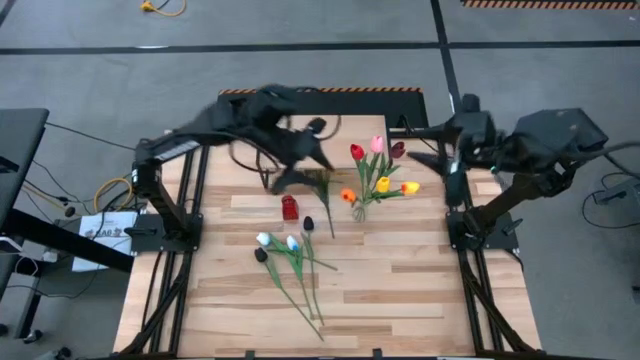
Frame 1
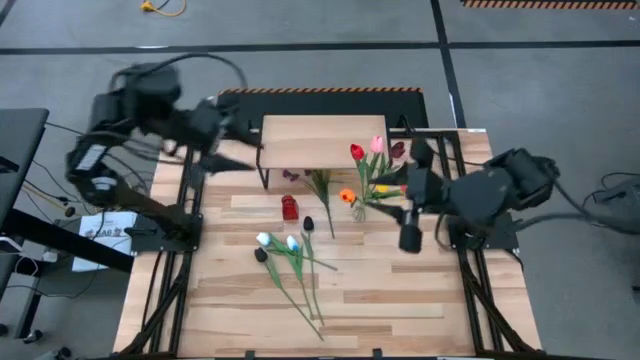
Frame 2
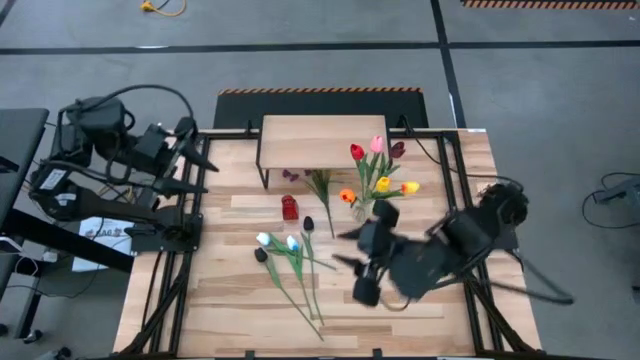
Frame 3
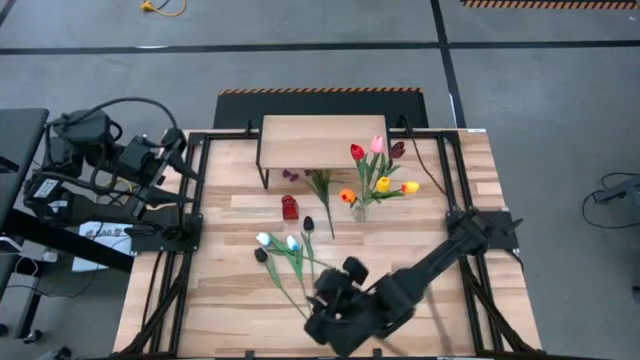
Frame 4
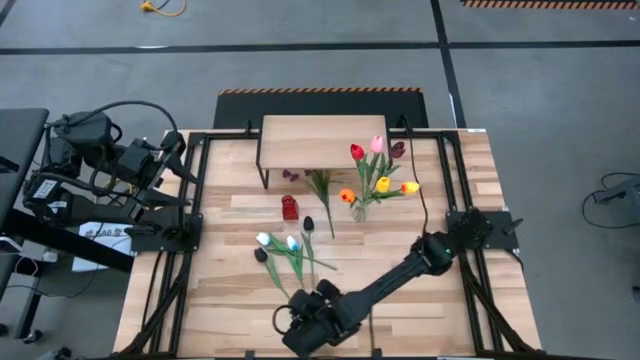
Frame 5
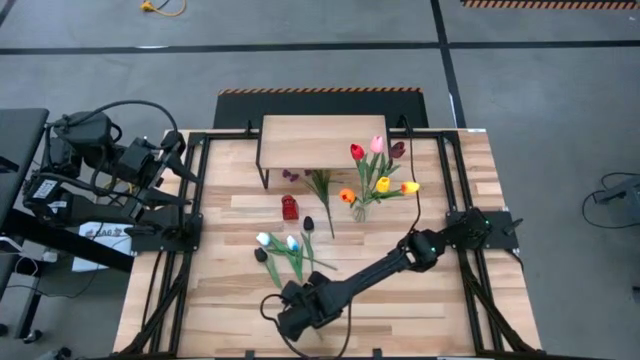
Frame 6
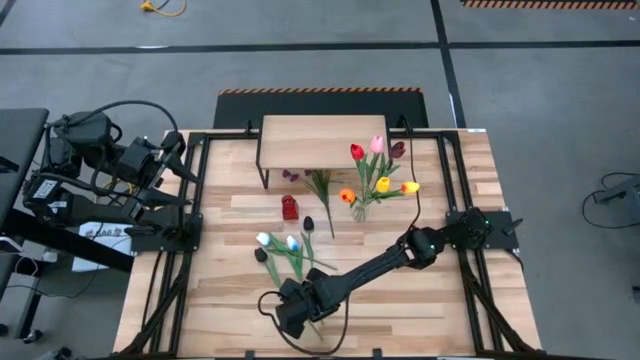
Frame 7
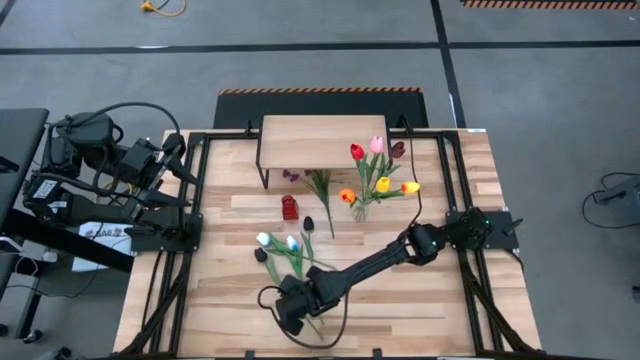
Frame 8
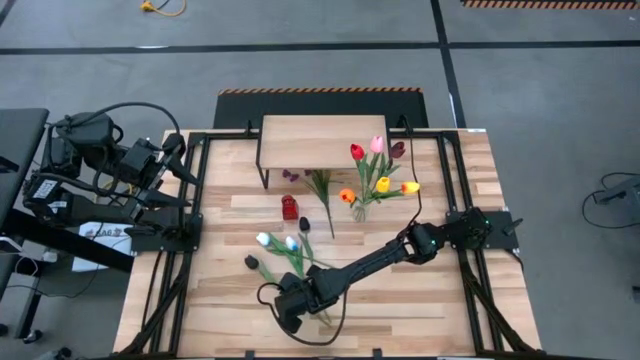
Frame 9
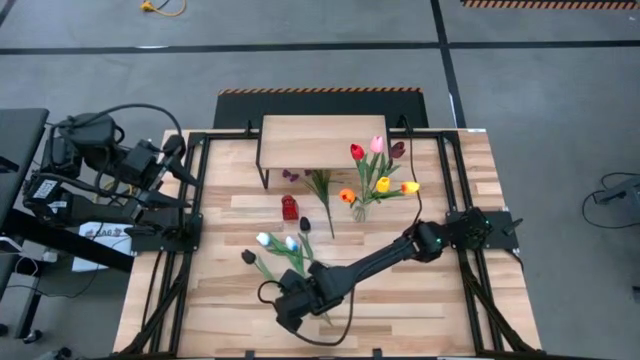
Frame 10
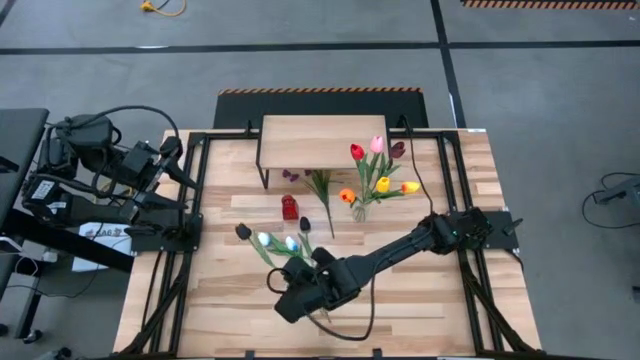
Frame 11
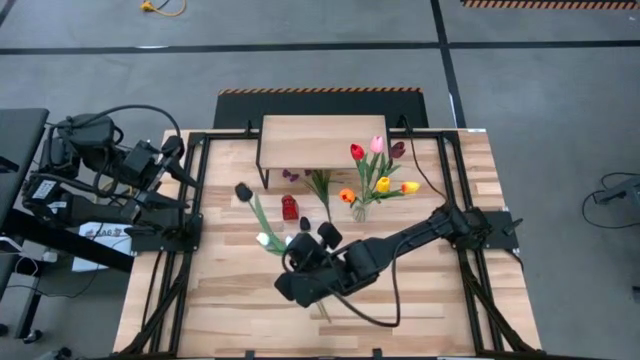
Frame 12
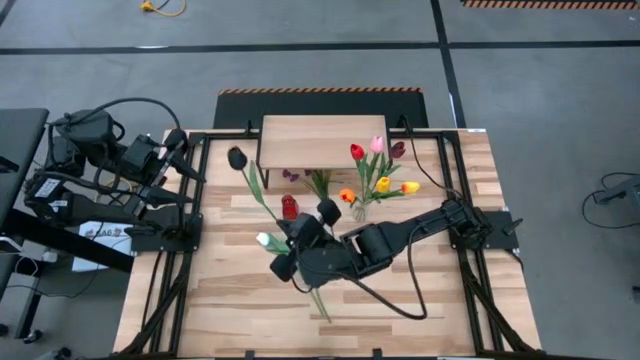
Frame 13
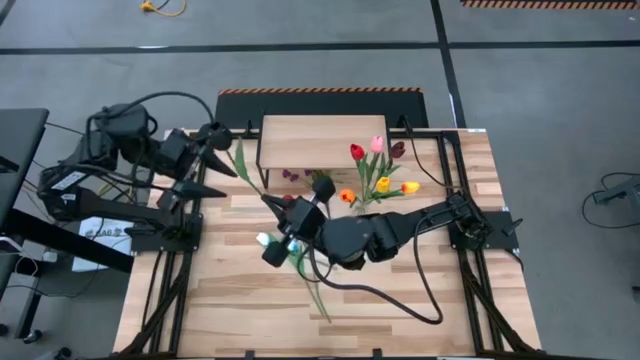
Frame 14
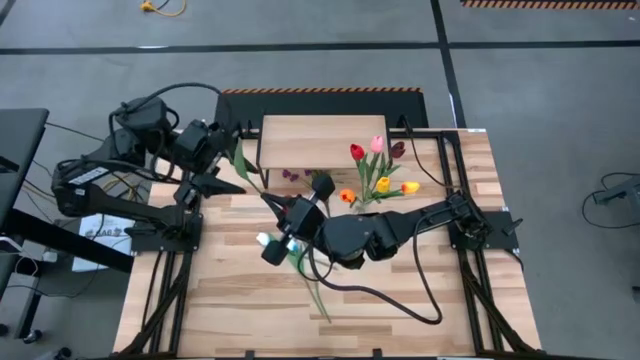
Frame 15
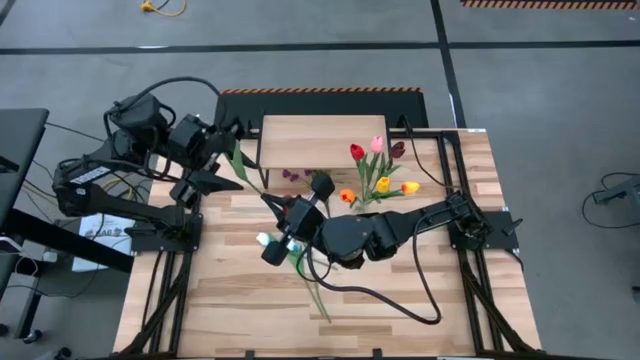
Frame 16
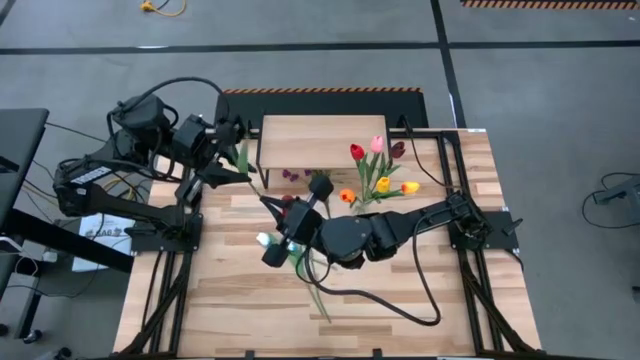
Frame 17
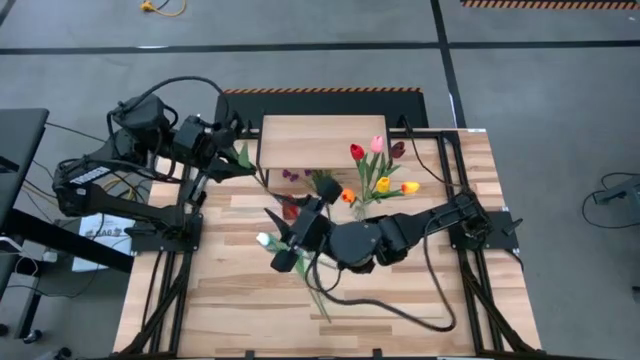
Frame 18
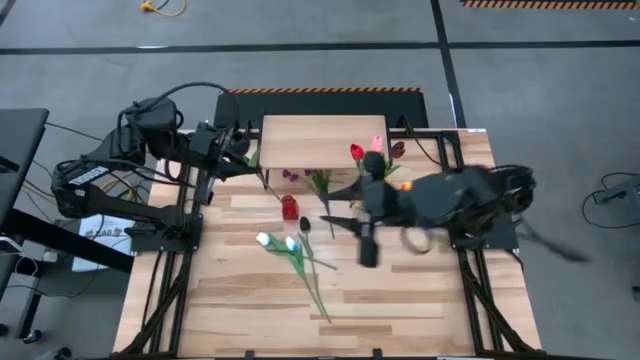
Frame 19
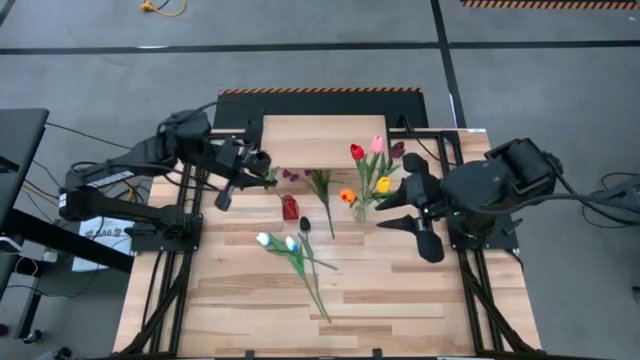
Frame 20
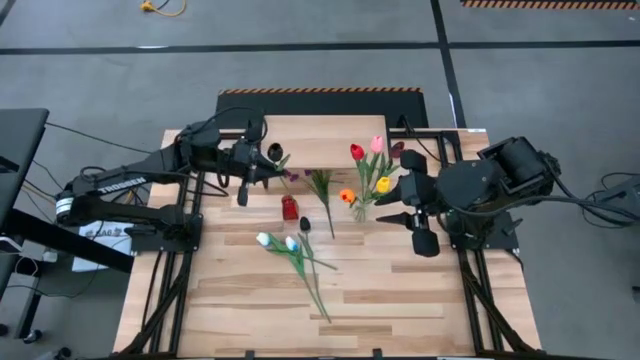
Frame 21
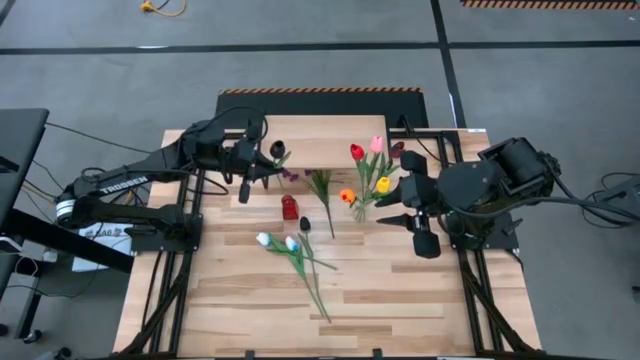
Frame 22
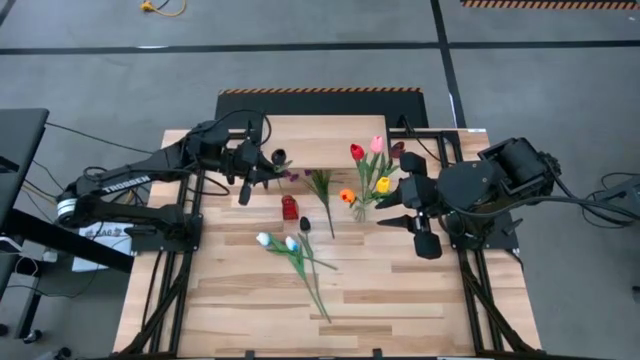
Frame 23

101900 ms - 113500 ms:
Task: Pick and place flowers into a vace then onto a shelf
Put the left black tulip into the red vase

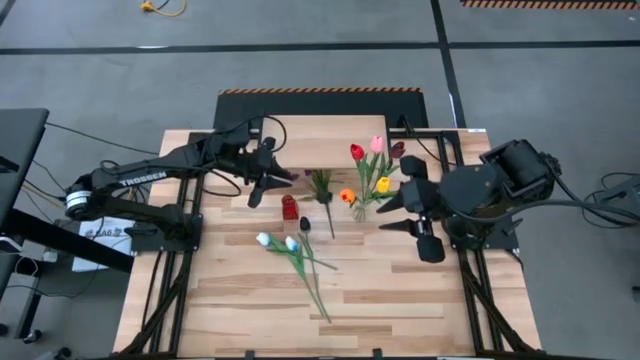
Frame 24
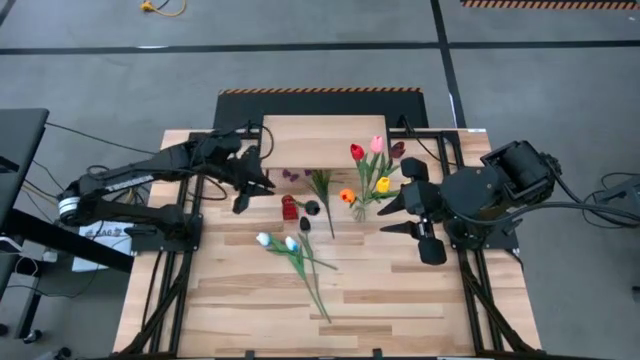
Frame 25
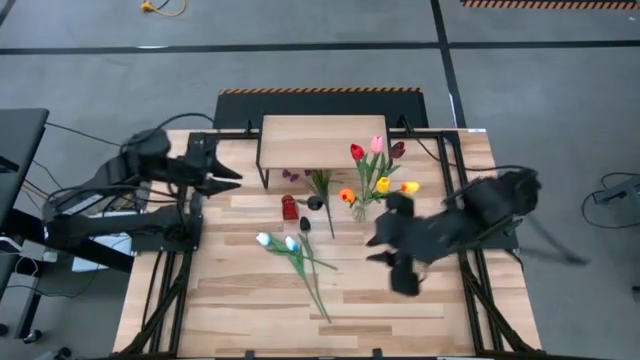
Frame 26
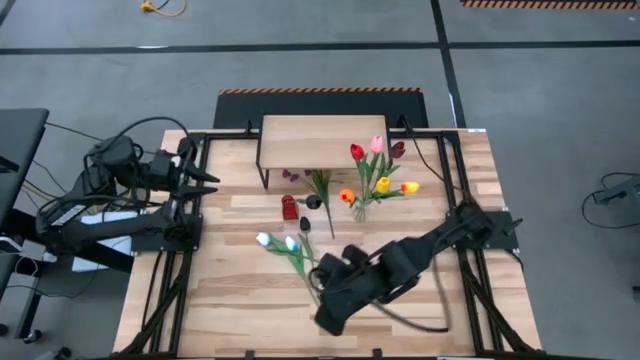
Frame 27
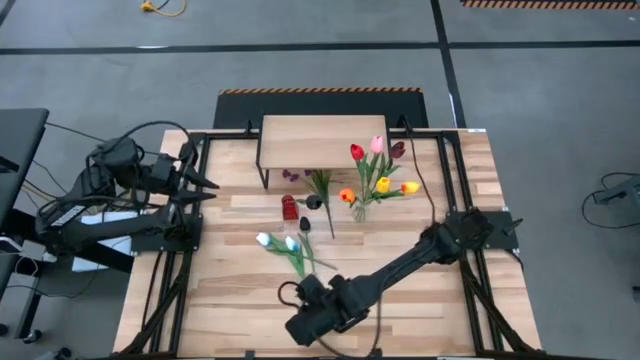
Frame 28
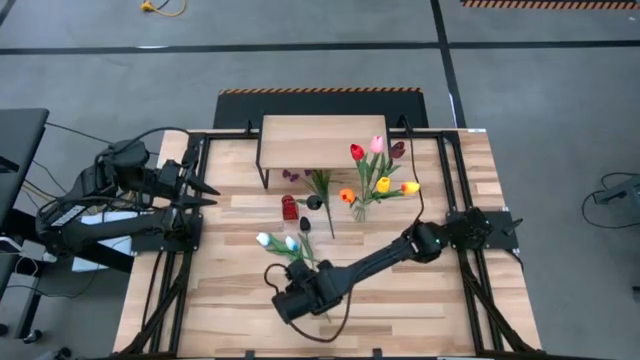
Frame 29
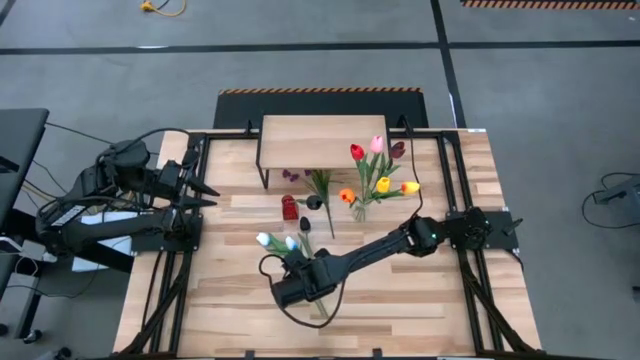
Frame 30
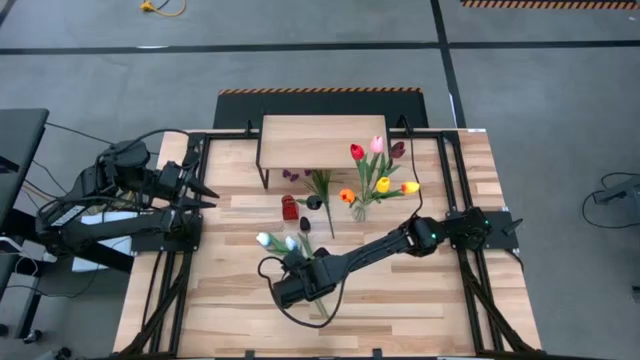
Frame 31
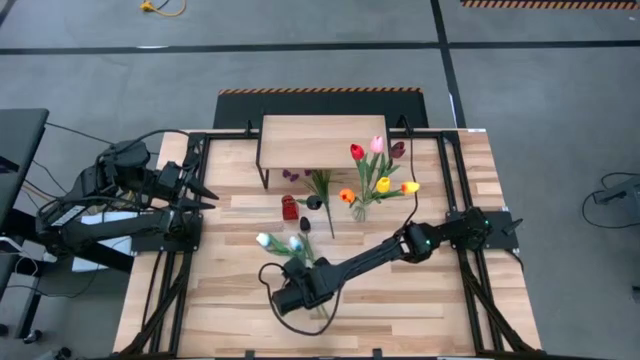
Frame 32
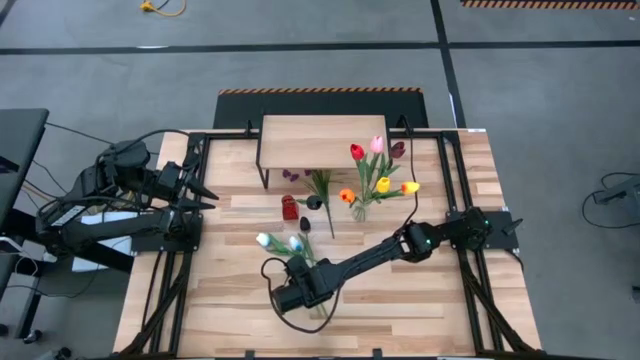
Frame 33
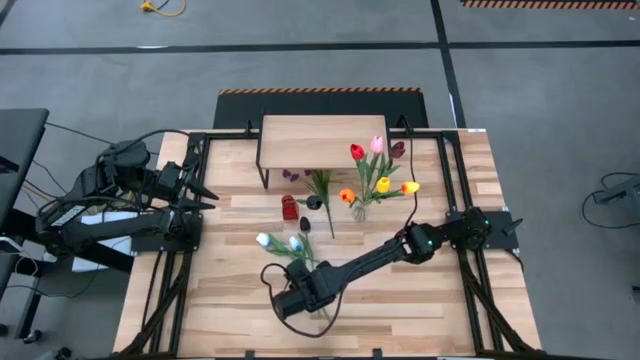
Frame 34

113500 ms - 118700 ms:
Put the right white tulip into the red vase

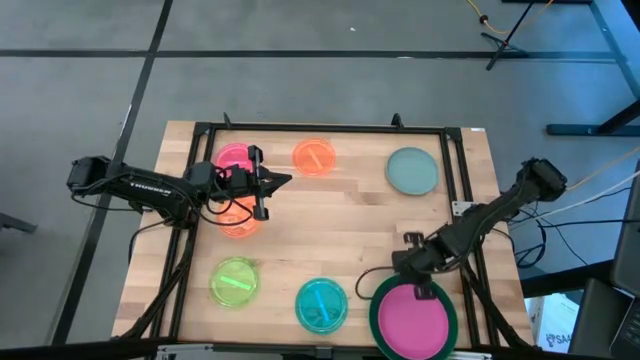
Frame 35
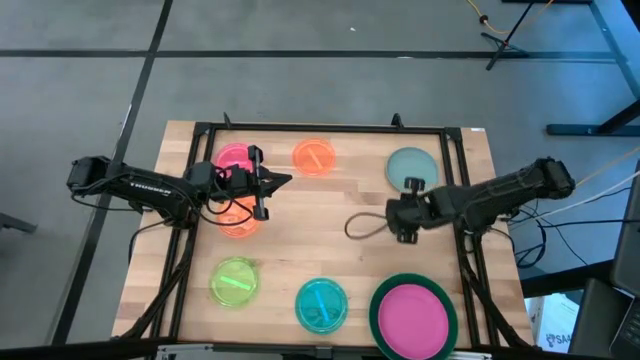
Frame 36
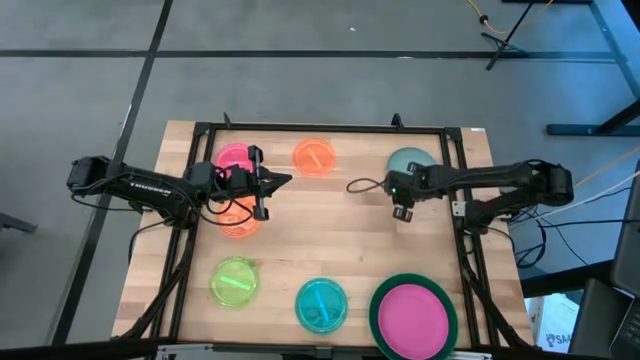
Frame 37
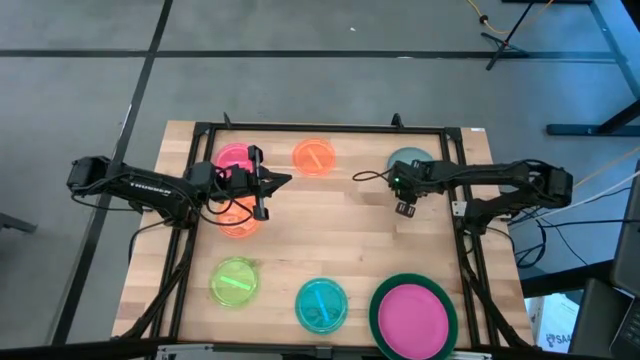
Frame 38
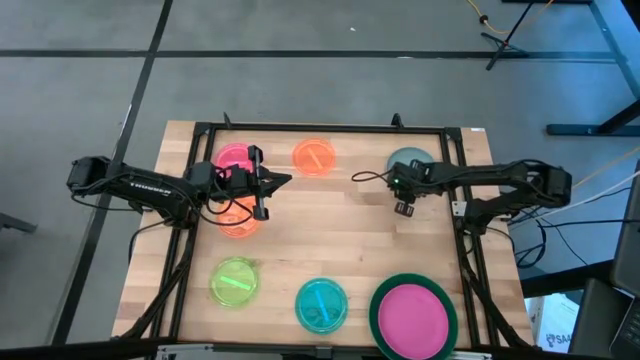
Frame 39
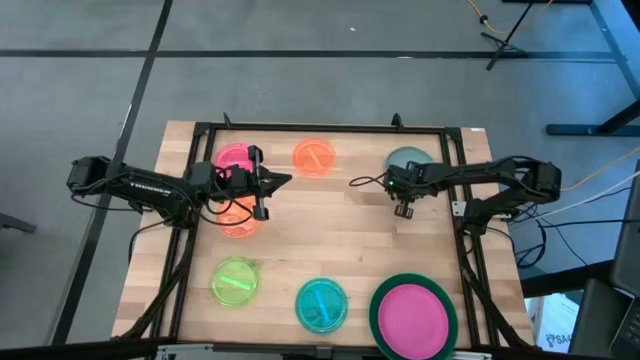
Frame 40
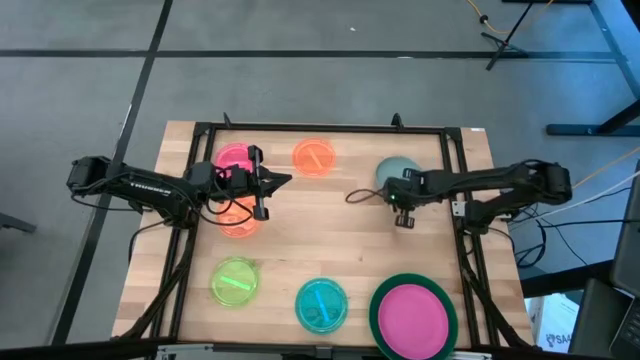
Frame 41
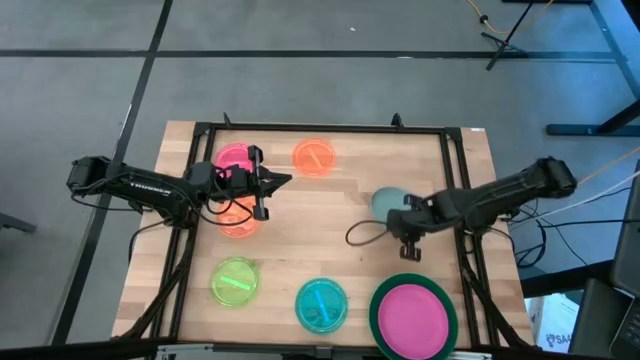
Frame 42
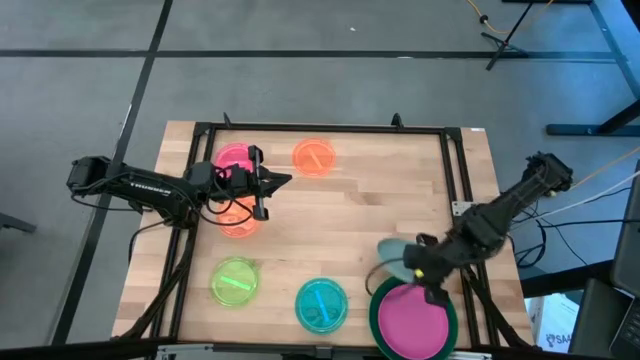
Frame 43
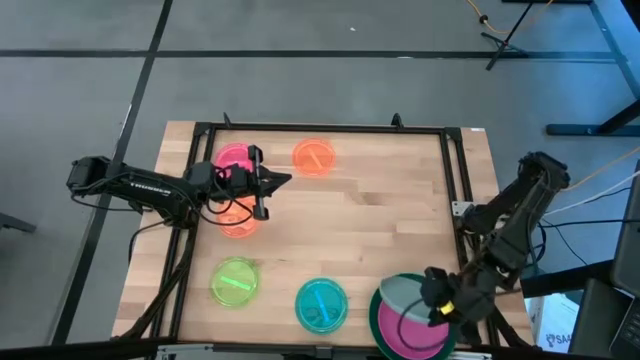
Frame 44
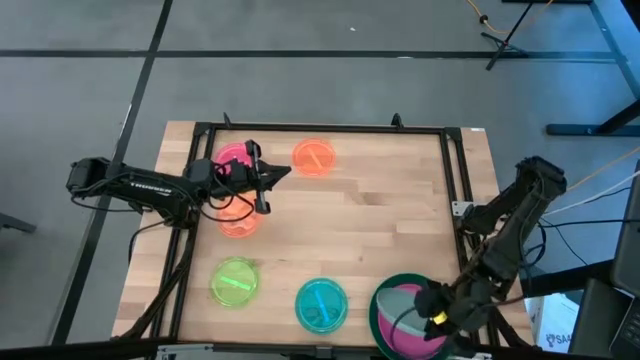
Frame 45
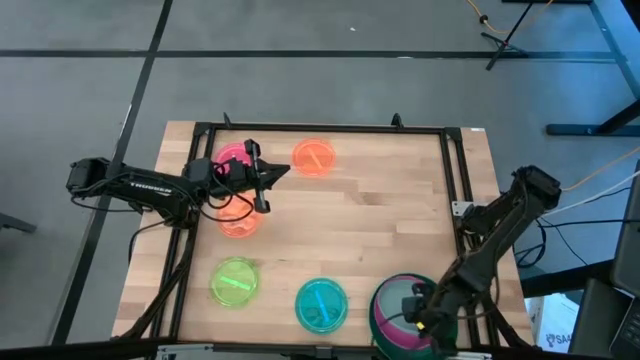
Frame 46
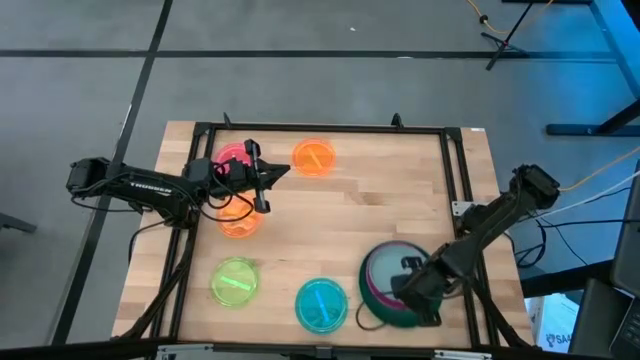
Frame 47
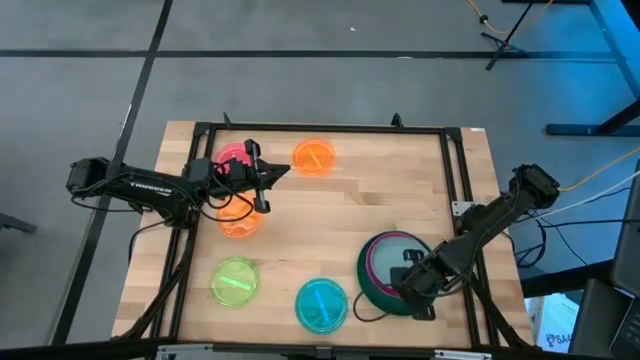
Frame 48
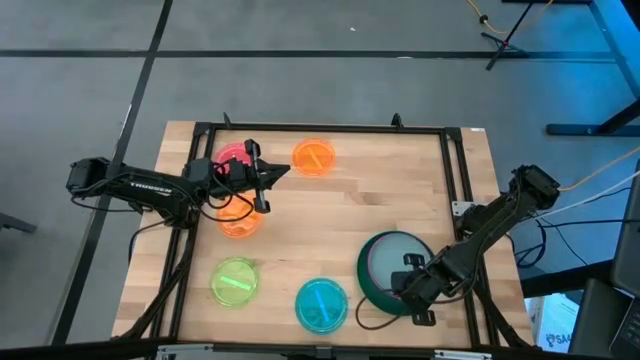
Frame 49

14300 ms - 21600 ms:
Task: Stack plastic plates
Stack the gray plate on the pink plate
